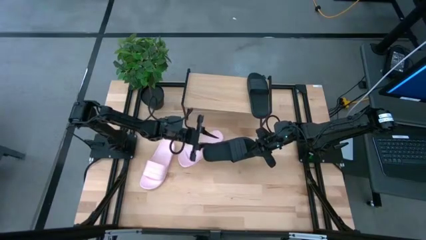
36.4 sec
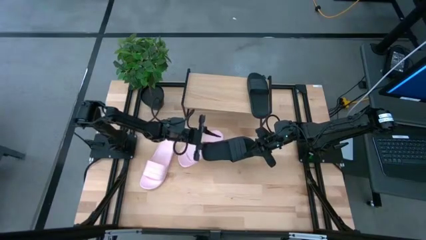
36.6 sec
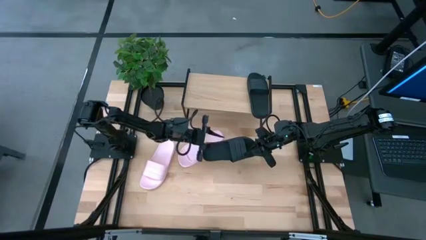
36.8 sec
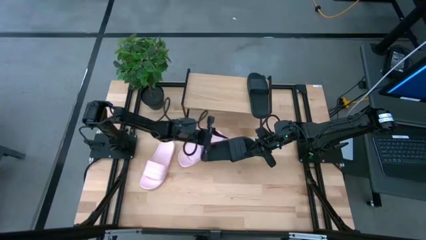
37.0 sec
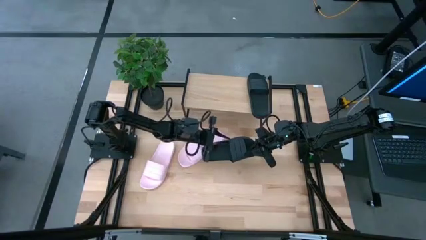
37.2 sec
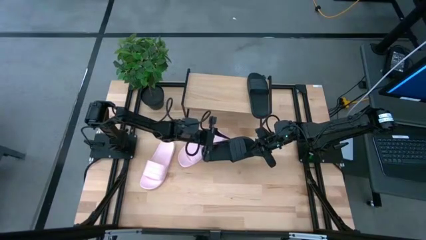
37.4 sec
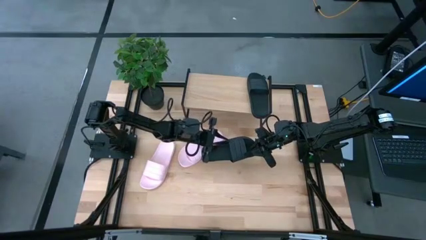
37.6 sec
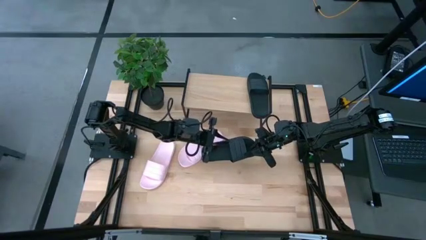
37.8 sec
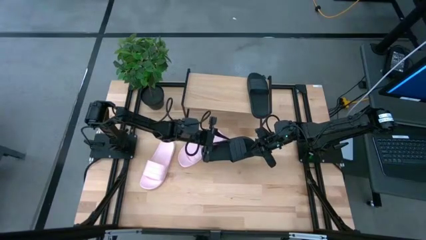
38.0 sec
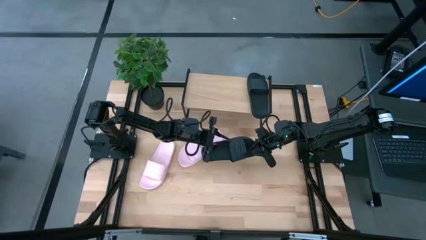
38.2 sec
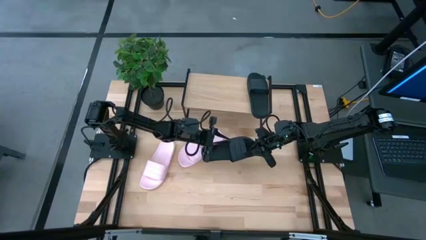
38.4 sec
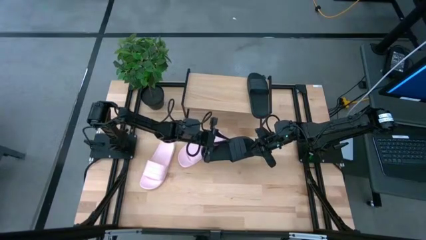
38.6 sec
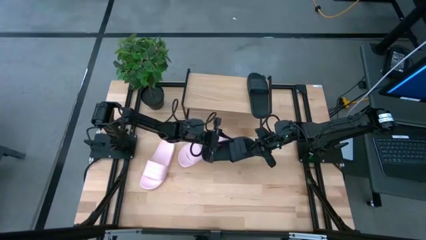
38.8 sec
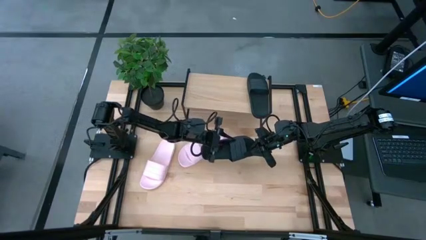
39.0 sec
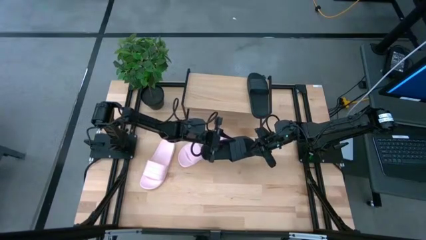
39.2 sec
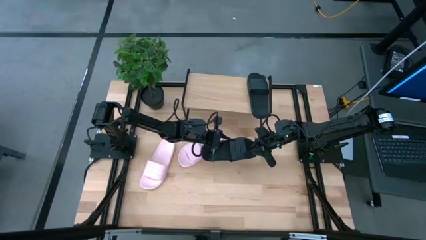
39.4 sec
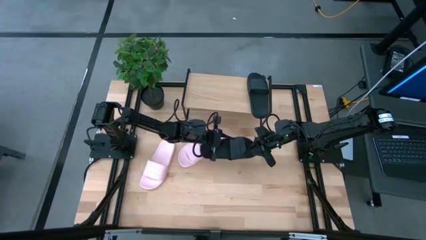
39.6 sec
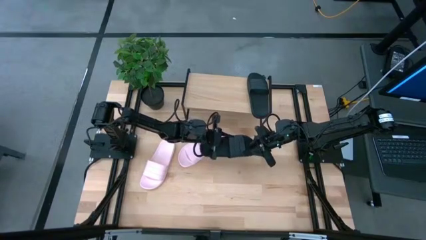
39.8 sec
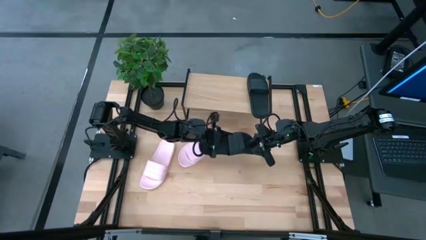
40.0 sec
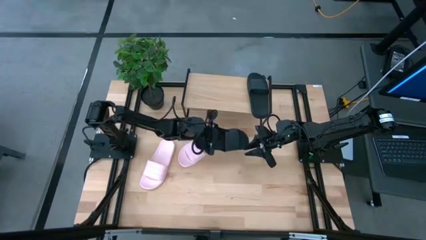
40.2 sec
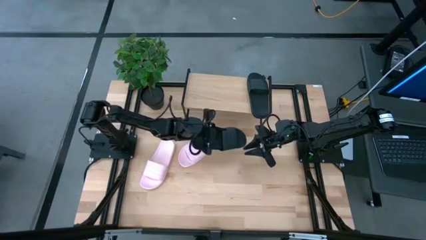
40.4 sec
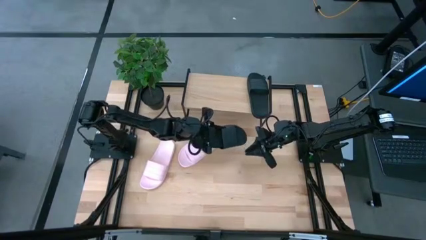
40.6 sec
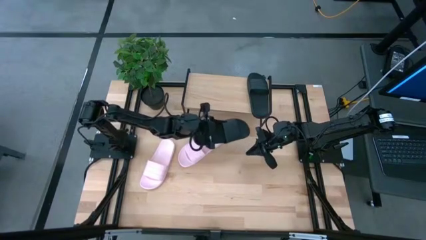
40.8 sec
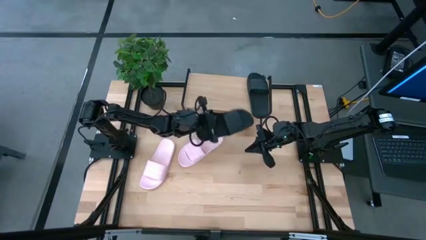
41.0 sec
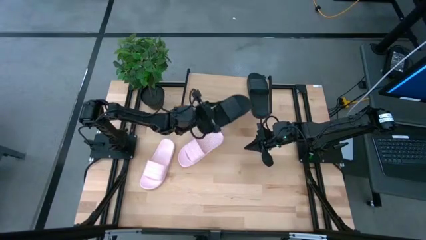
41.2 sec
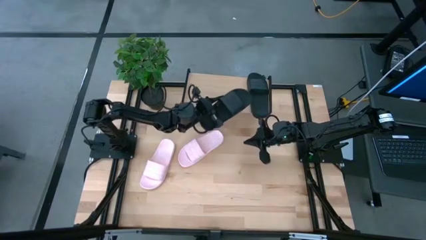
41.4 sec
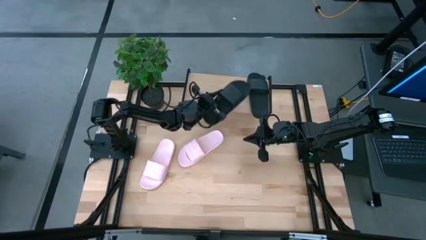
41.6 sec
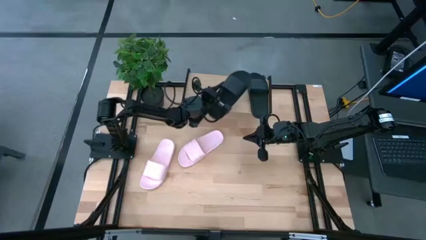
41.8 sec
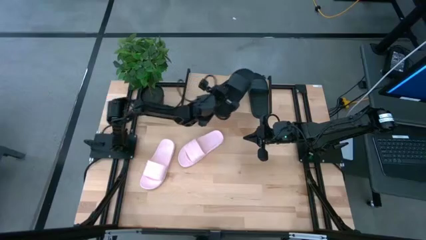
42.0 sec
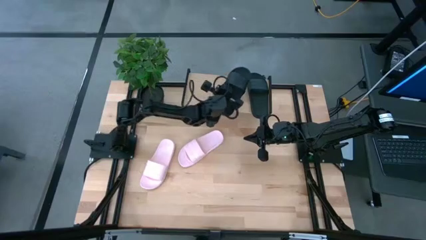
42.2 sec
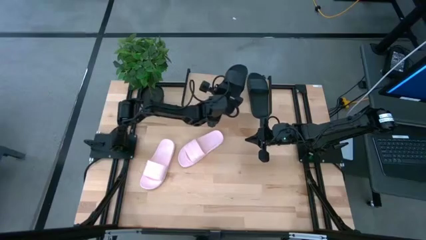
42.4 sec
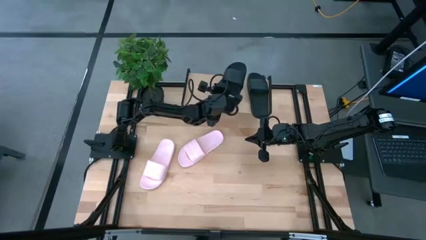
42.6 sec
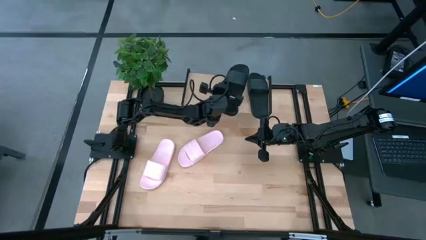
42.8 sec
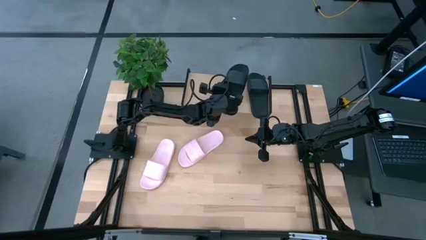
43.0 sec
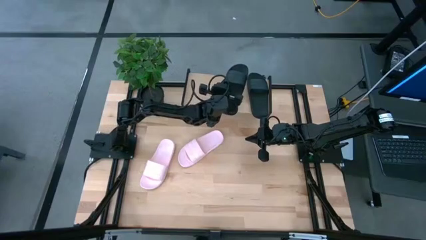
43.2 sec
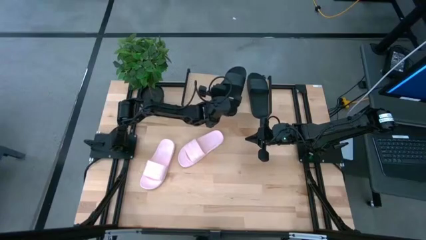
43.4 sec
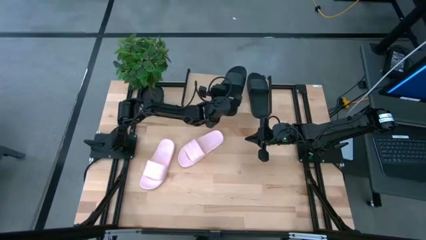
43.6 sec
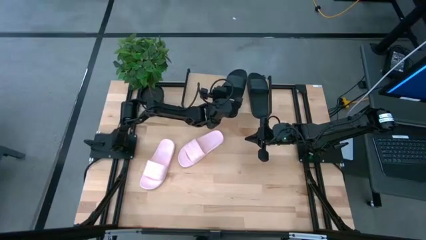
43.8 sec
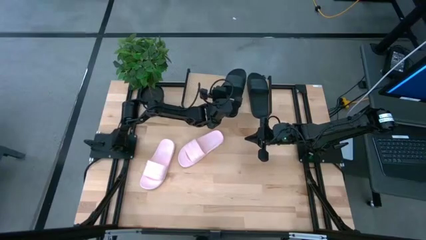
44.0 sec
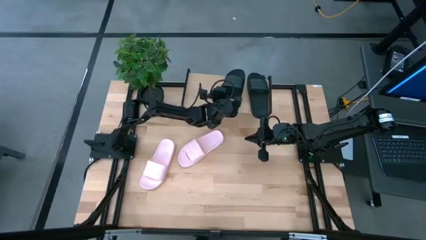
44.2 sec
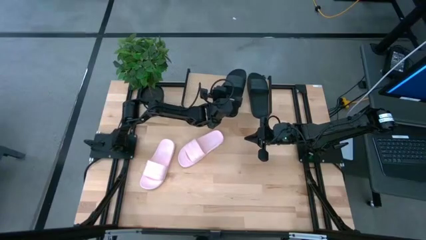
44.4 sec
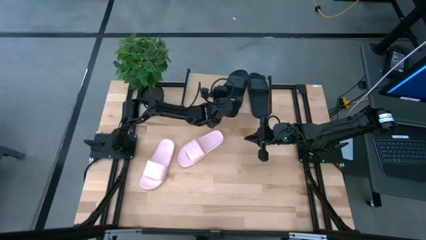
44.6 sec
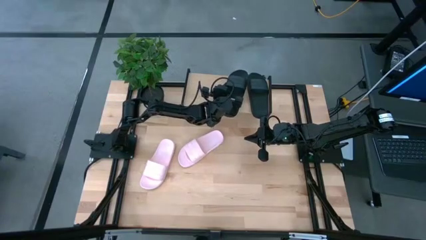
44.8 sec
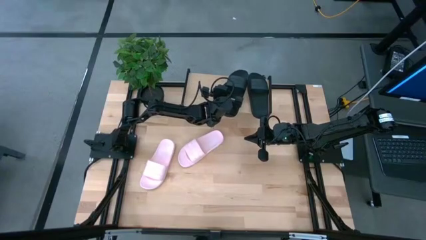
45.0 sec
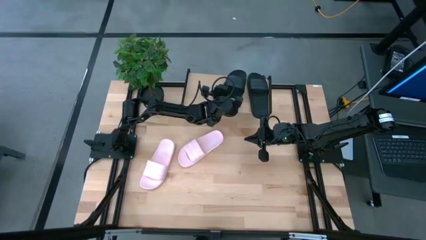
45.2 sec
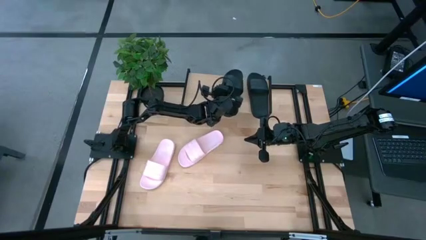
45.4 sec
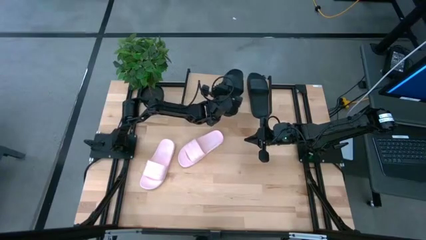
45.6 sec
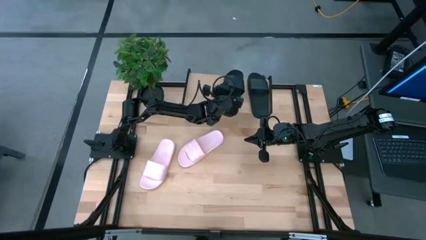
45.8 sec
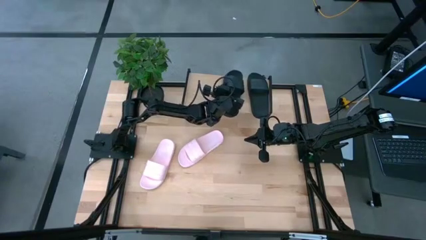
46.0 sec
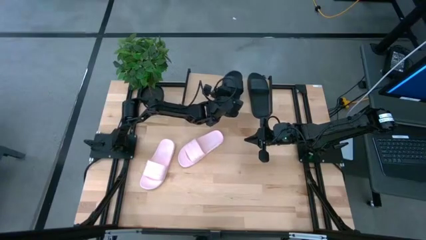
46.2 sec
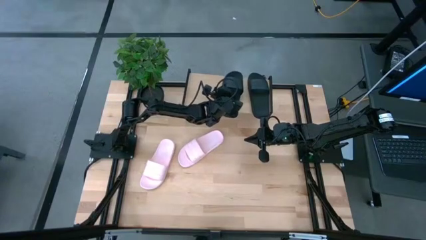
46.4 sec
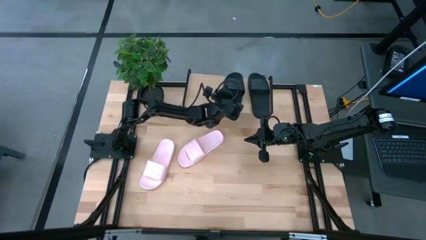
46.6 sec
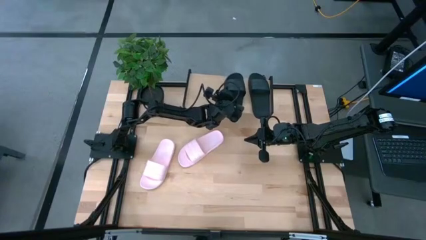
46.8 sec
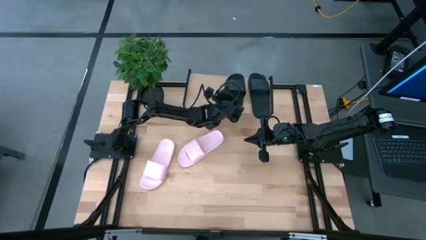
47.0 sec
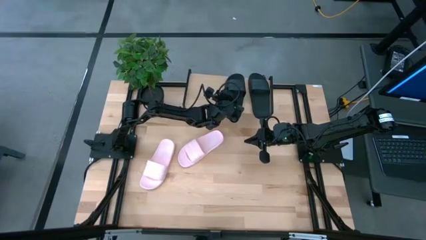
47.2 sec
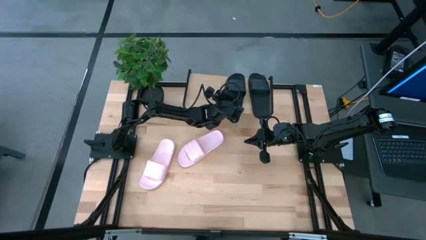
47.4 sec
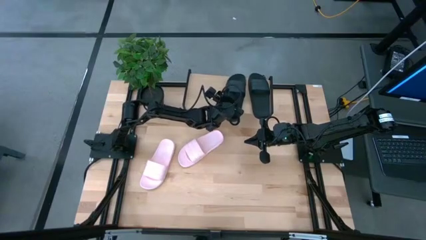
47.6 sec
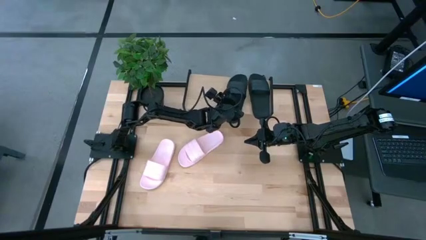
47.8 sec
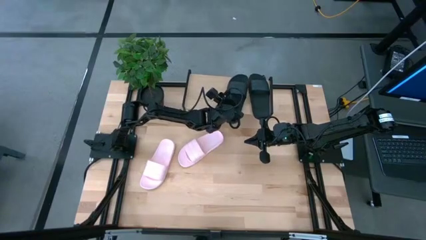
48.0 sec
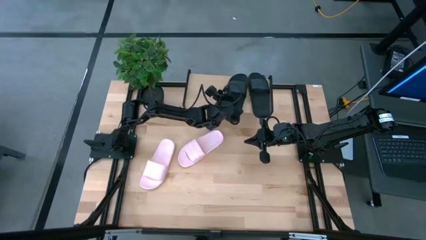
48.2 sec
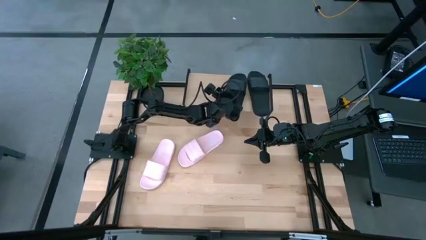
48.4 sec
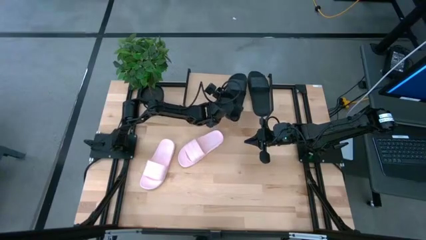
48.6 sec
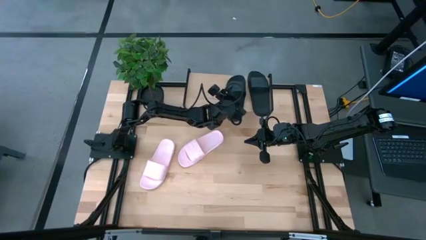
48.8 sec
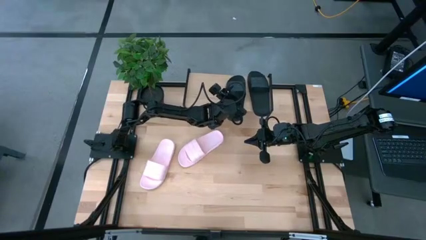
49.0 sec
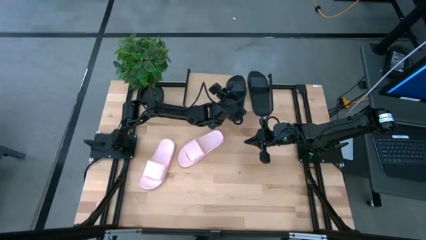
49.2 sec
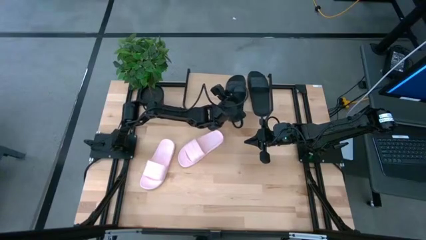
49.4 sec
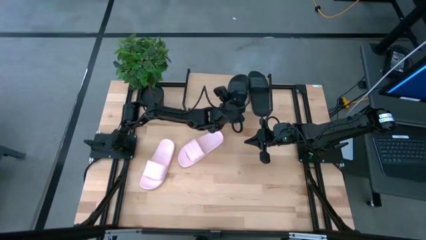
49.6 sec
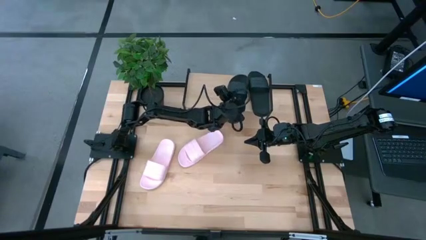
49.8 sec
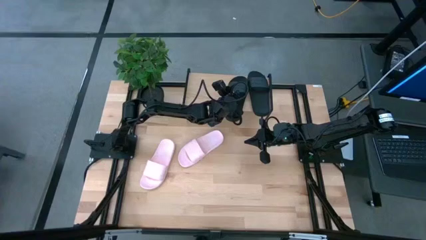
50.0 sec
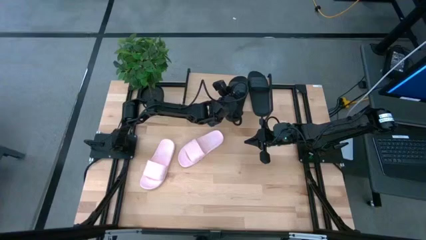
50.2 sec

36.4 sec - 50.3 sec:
Task: Pick and place slides into the shelf
Put the black slide on the shelf

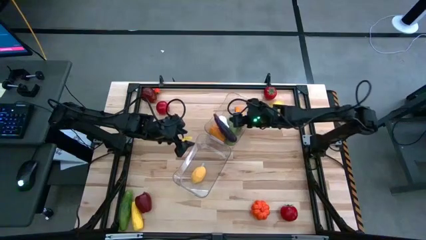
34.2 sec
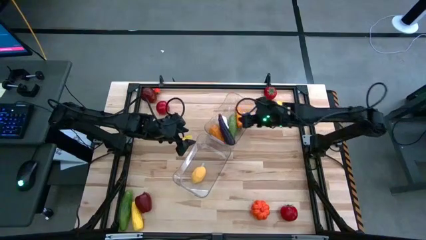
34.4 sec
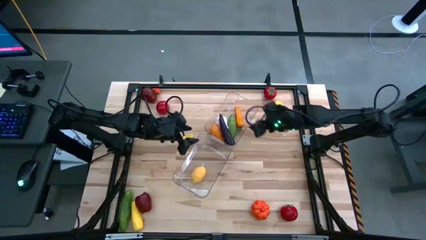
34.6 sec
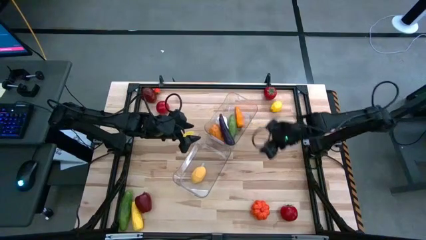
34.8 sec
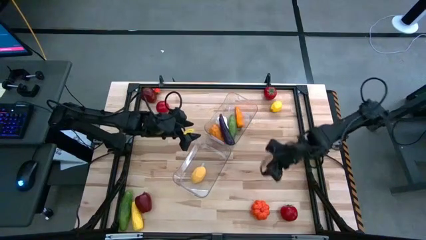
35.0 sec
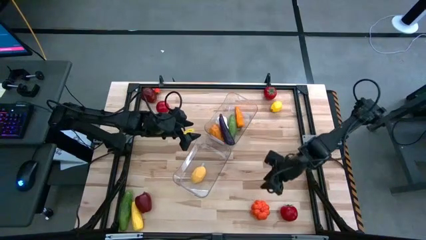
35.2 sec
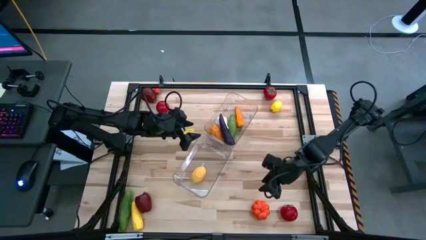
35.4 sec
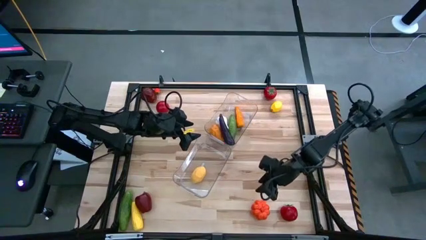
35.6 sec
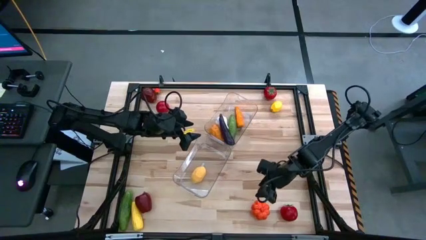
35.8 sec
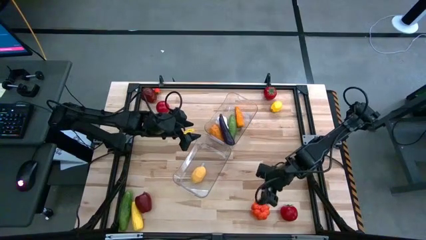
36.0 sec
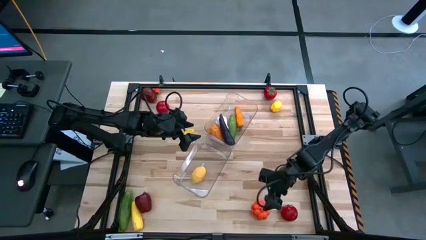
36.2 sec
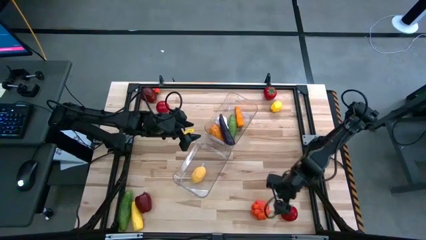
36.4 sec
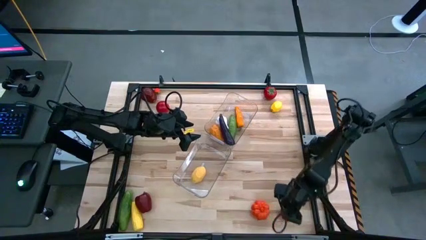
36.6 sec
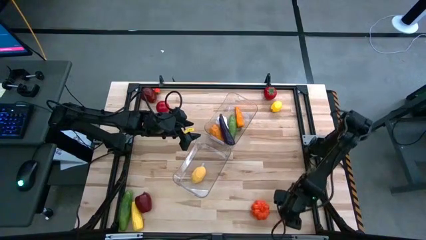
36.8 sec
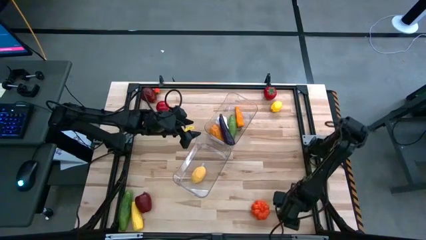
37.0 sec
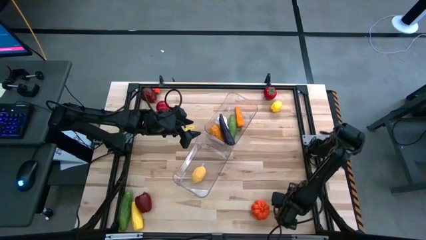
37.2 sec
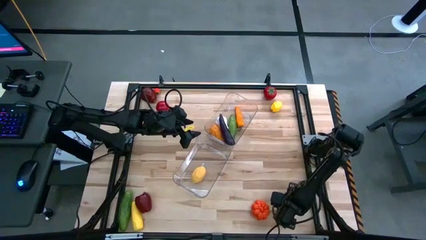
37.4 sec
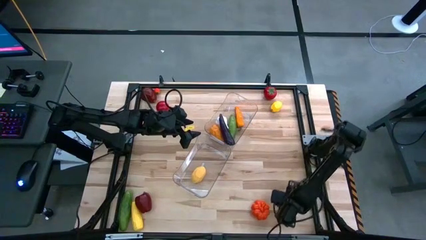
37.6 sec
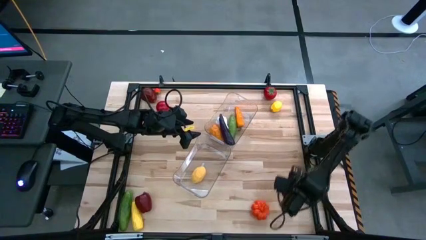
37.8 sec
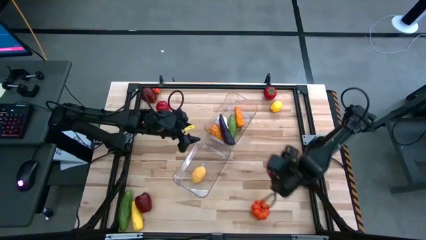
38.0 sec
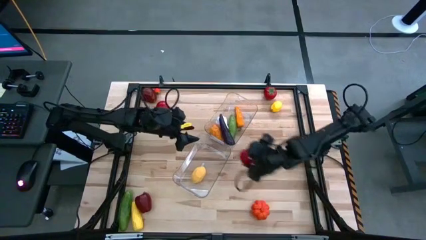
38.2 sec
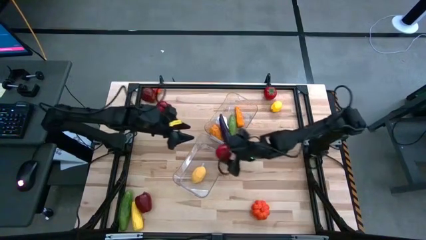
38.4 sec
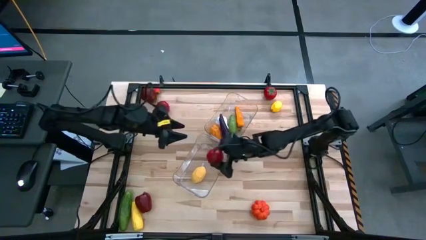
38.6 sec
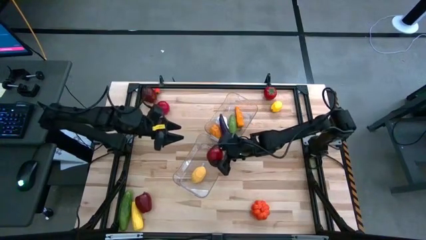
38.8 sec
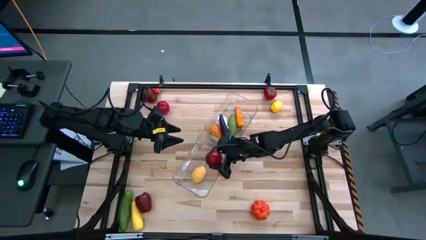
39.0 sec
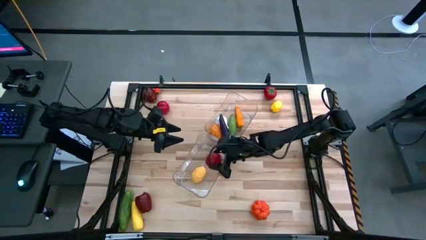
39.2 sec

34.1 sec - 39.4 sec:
Task: Sort produce into baskets
Put the bottom right red tomato into the bottom transparent bin
